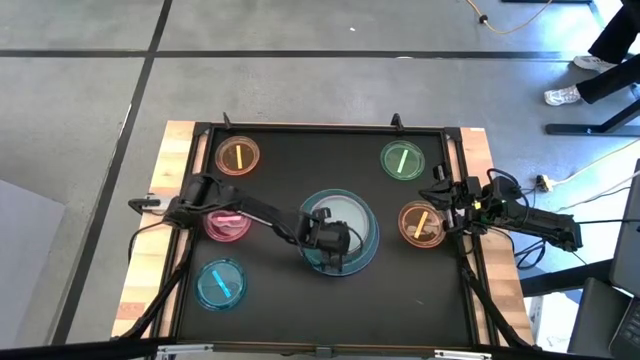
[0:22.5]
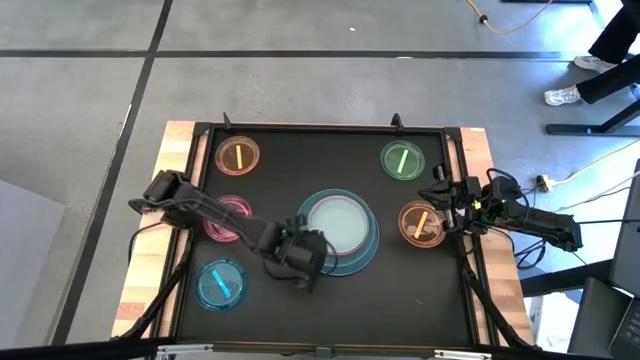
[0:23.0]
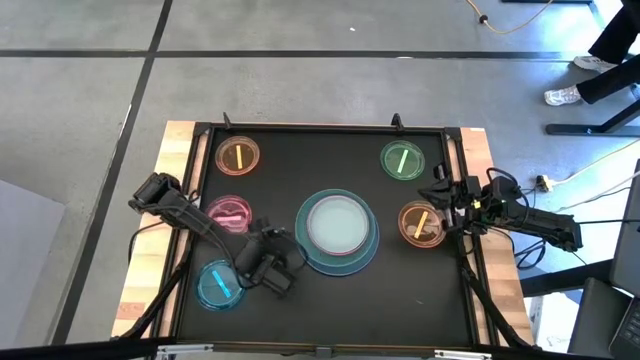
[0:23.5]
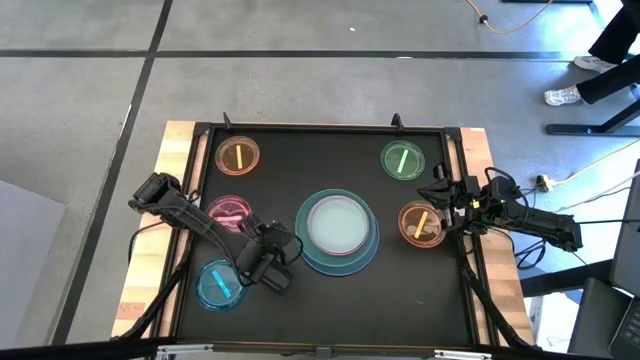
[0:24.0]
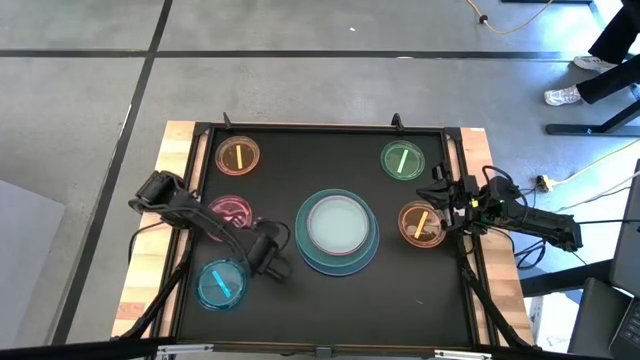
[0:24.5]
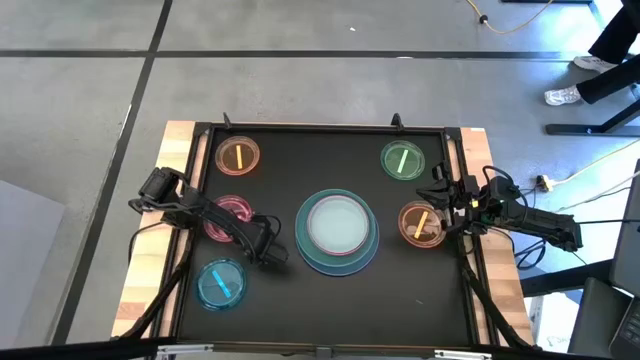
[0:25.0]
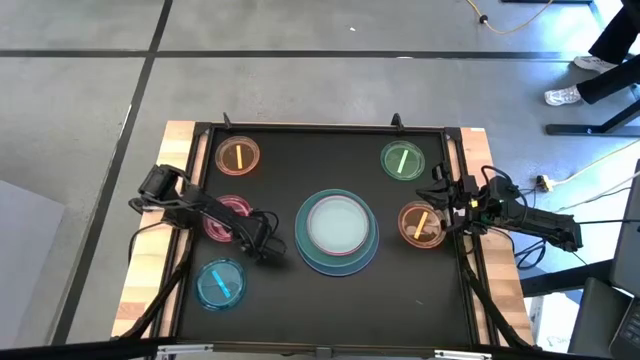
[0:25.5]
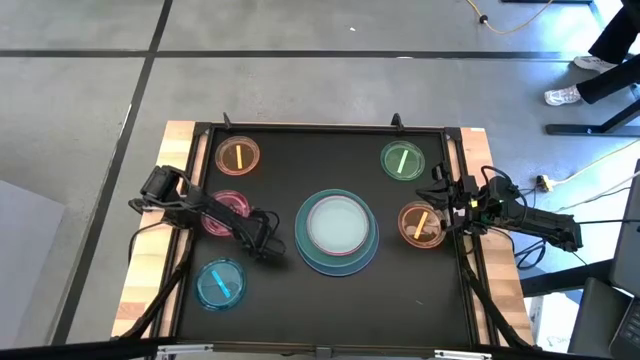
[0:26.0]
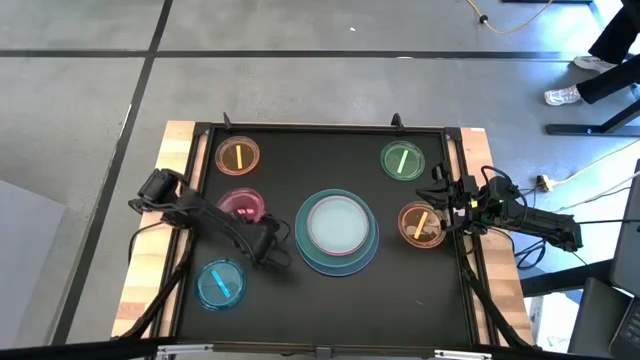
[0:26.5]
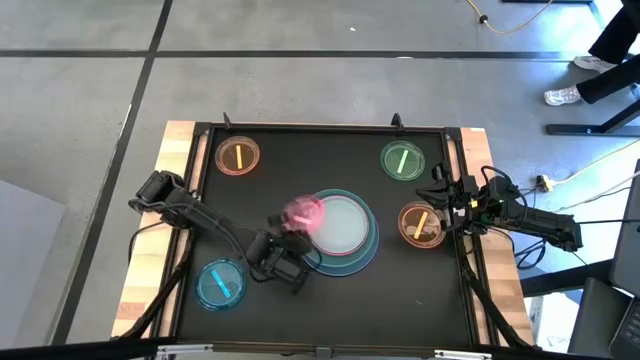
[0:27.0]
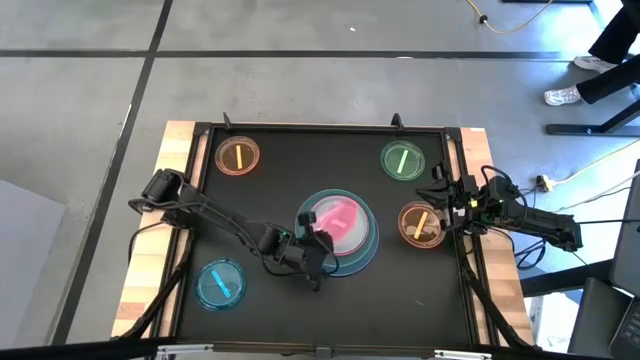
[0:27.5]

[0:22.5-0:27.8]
Task: Stack plastic plates
Stack the light pink transparent plate on the gray plate

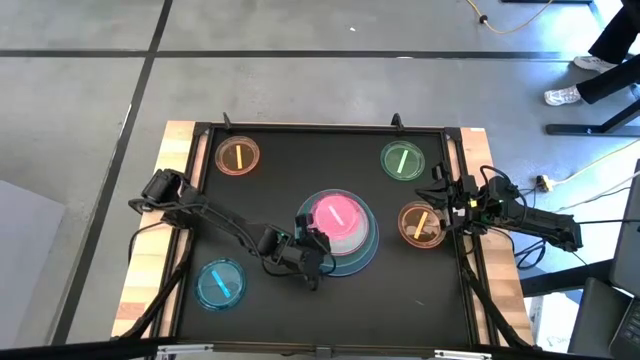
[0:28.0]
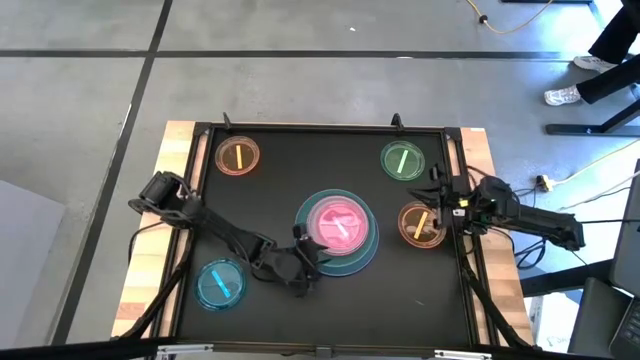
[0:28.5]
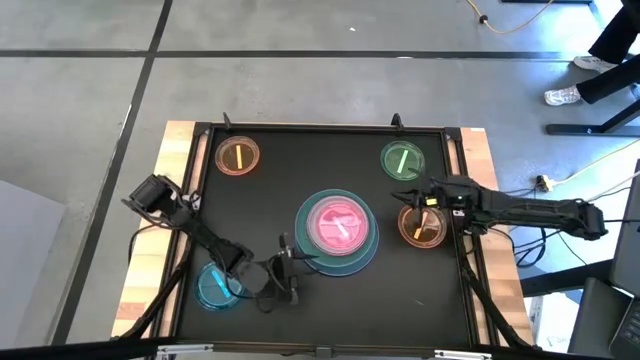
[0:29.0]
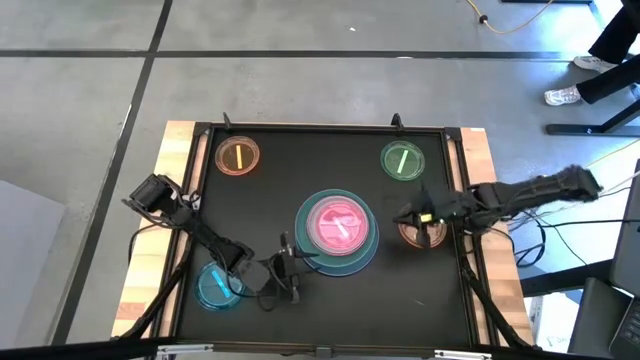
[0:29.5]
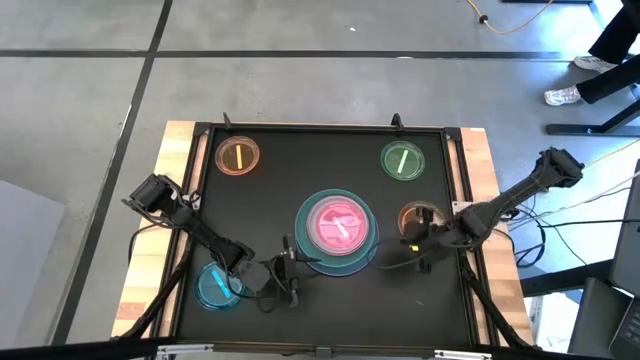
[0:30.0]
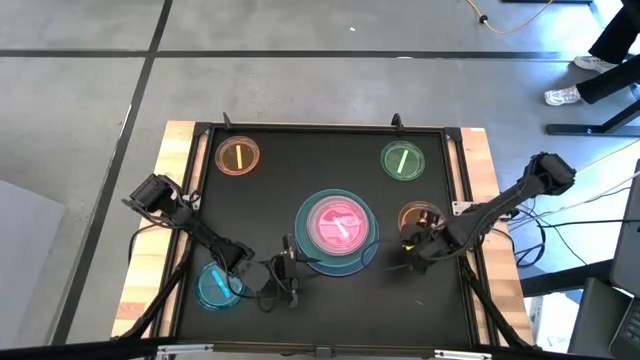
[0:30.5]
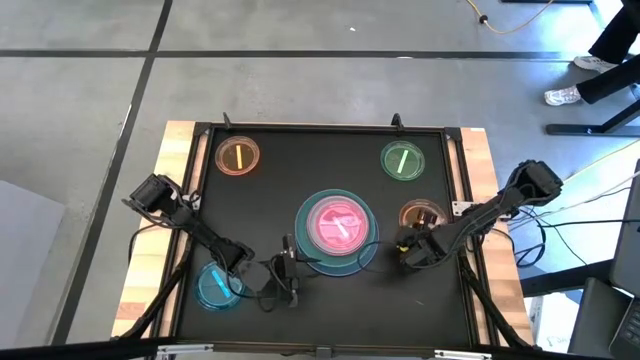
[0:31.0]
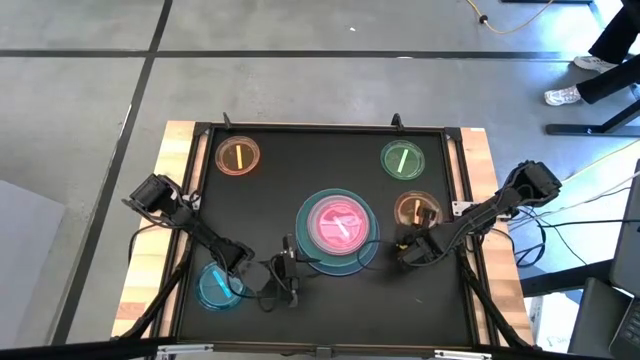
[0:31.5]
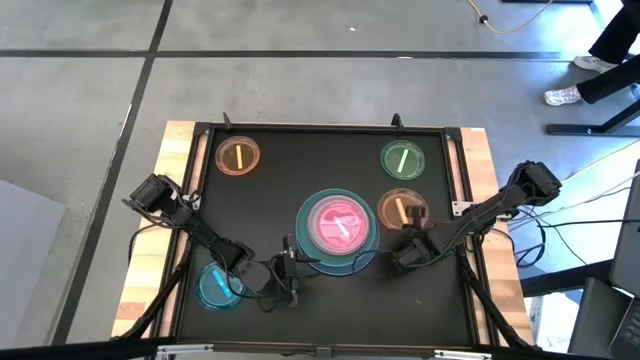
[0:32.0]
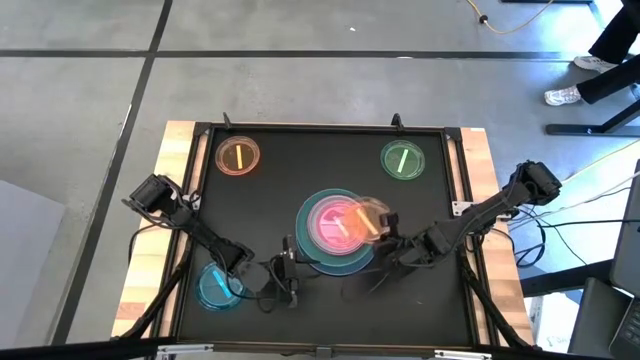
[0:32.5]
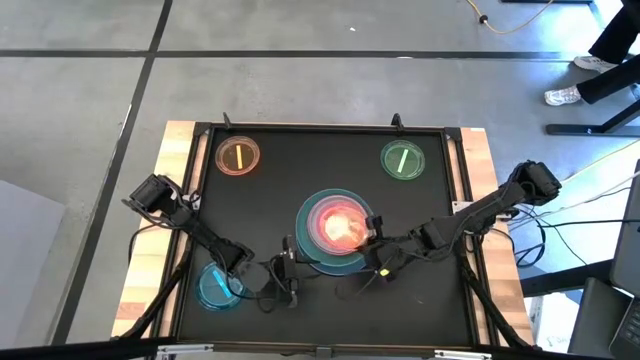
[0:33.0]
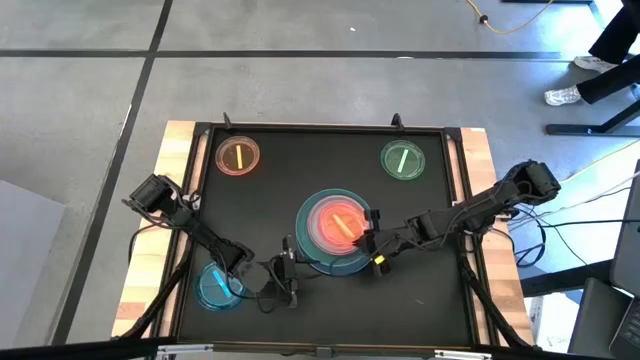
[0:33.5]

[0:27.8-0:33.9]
Stack the bottom light orange transparent plate on the light red transparent plate

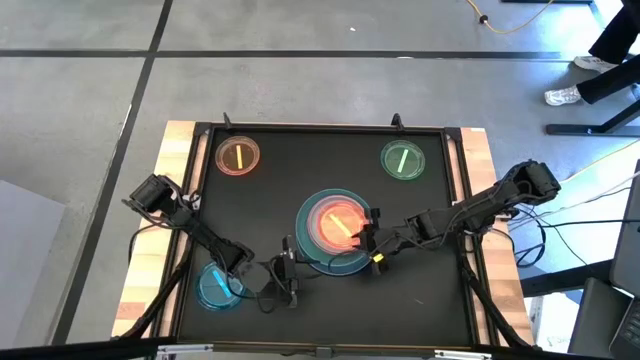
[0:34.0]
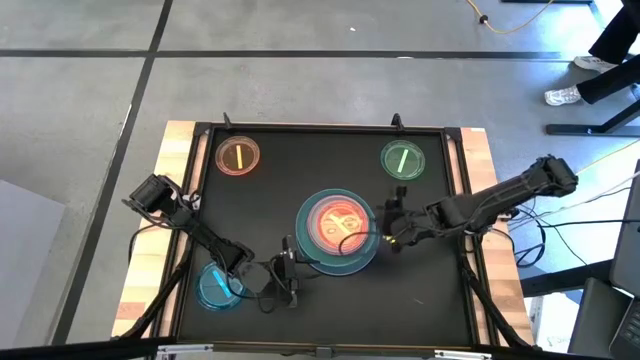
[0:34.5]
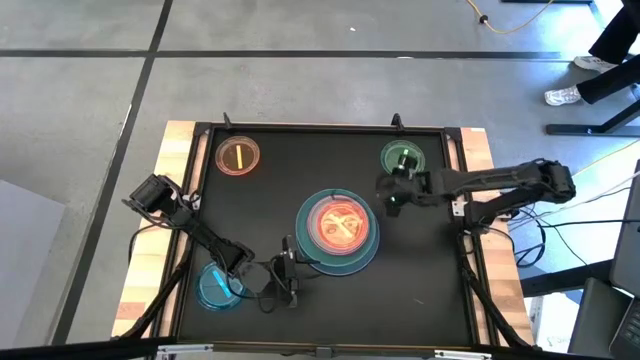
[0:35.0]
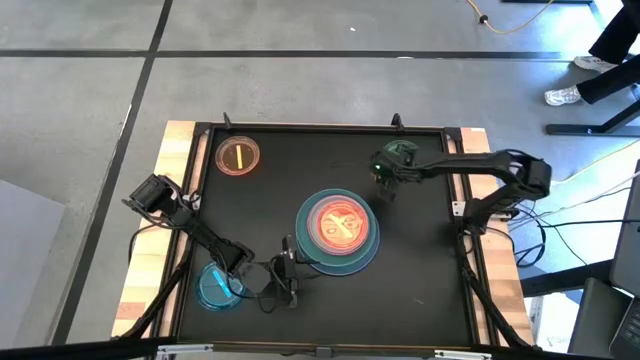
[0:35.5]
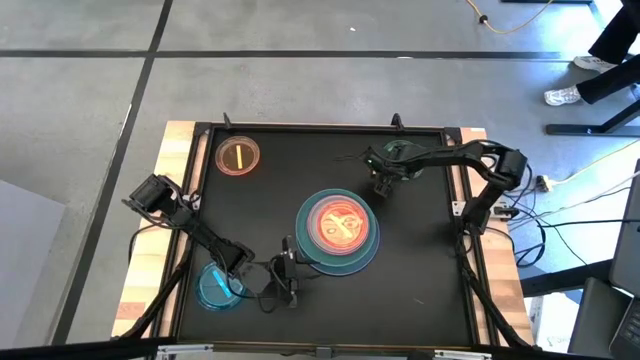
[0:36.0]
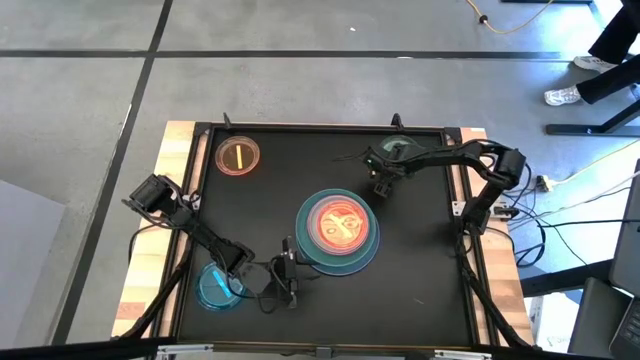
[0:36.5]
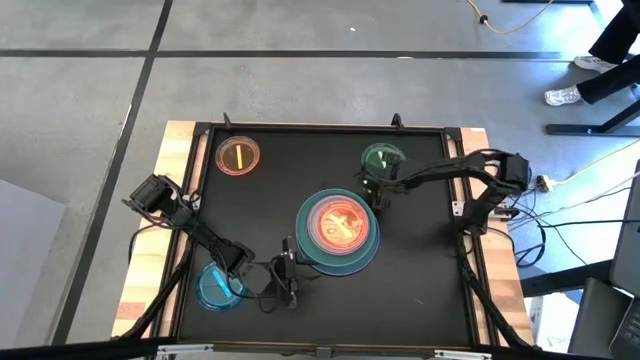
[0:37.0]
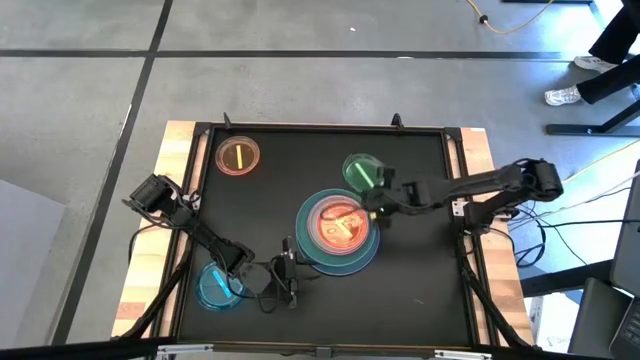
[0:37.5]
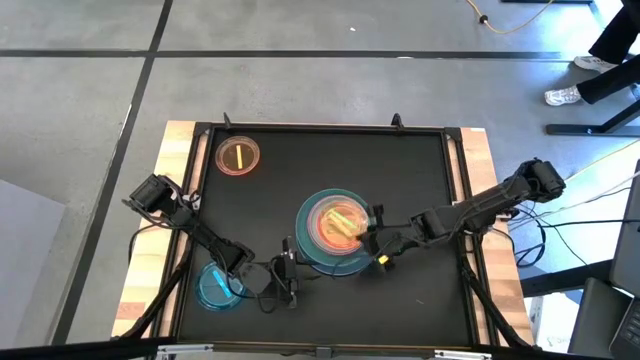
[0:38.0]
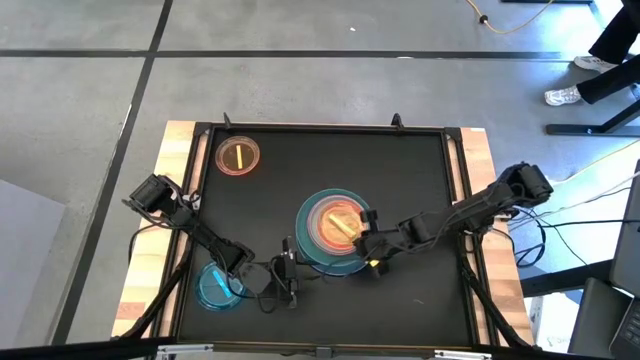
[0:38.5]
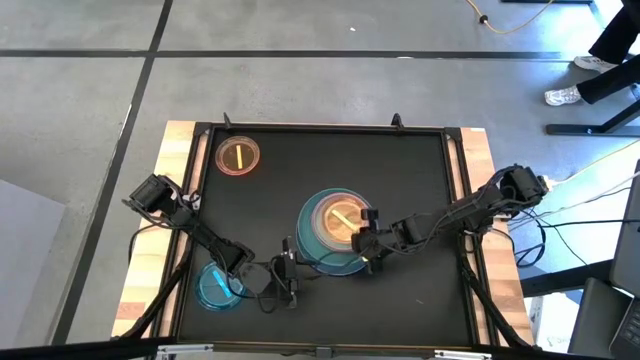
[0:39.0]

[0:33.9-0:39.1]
Stack the light green transparent plate on the light orange transparent plate

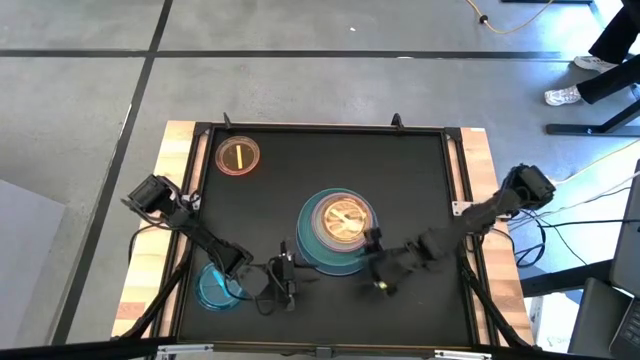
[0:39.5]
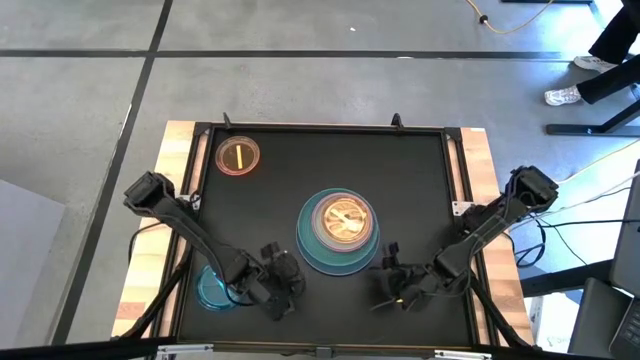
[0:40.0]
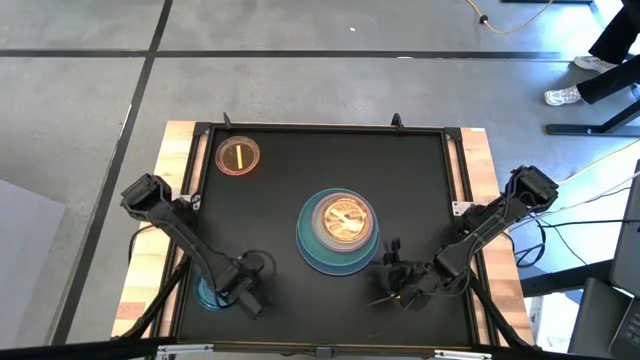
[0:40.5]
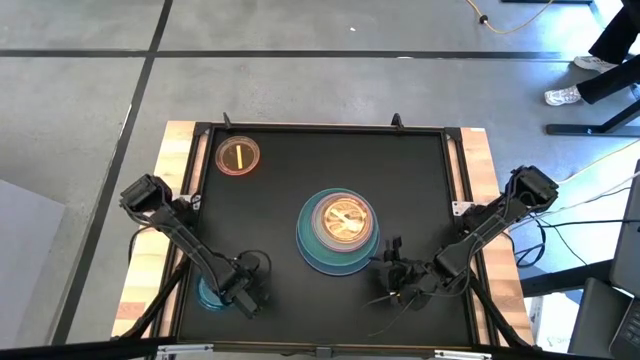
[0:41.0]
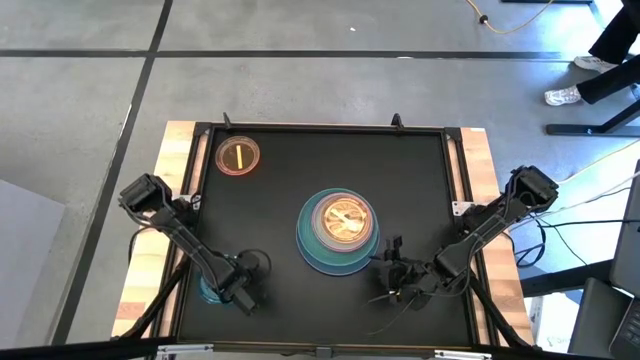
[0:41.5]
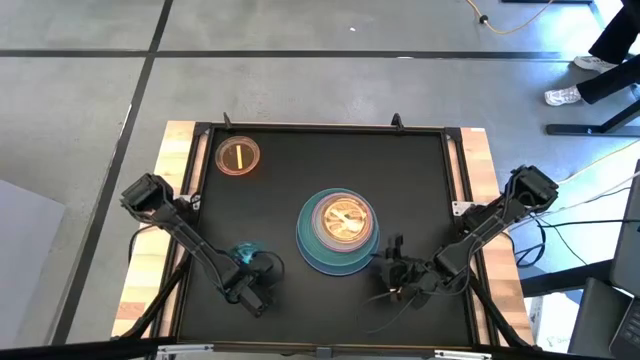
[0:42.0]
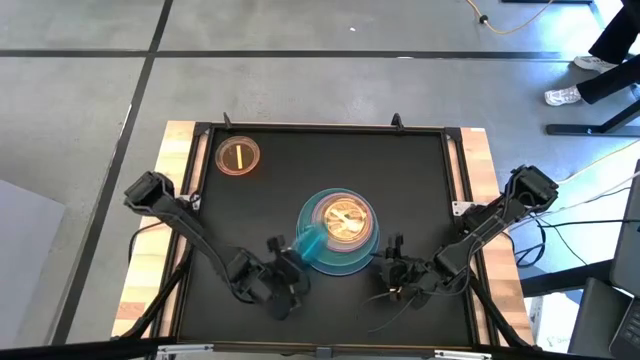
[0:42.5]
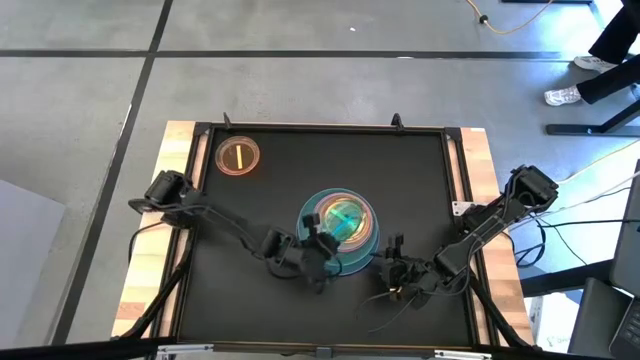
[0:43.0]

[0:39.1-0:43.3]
Stack the light blue transparent plate on the light green transparent plate
